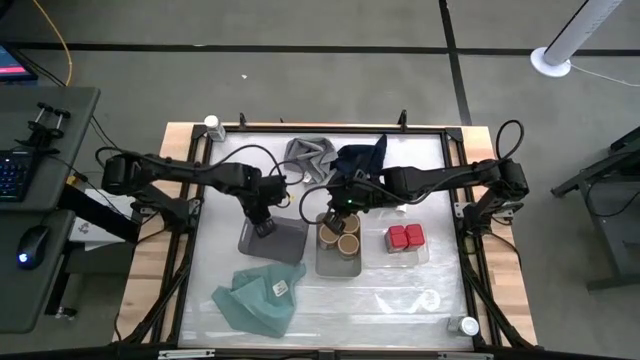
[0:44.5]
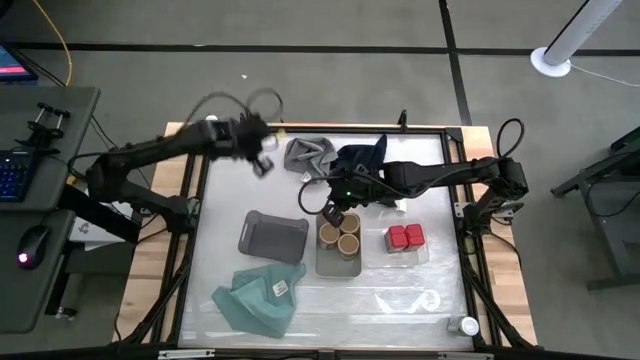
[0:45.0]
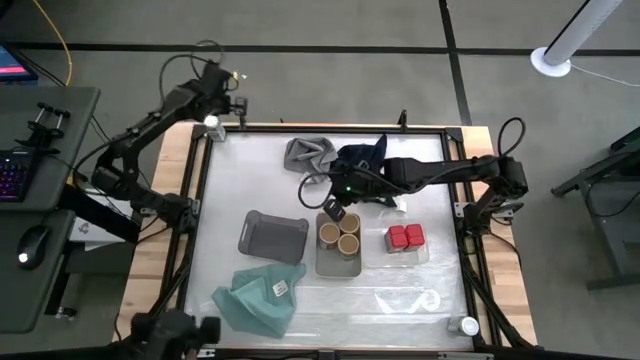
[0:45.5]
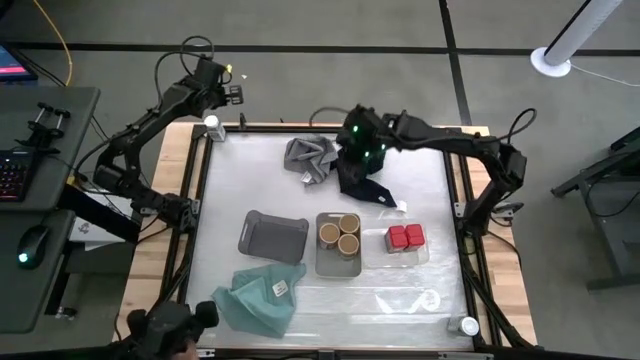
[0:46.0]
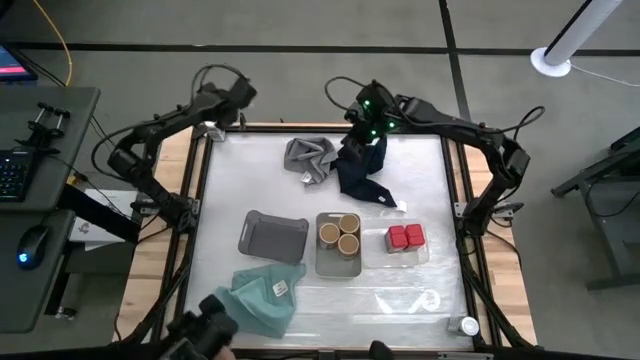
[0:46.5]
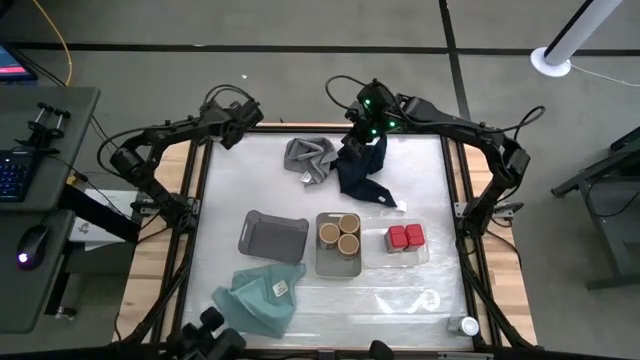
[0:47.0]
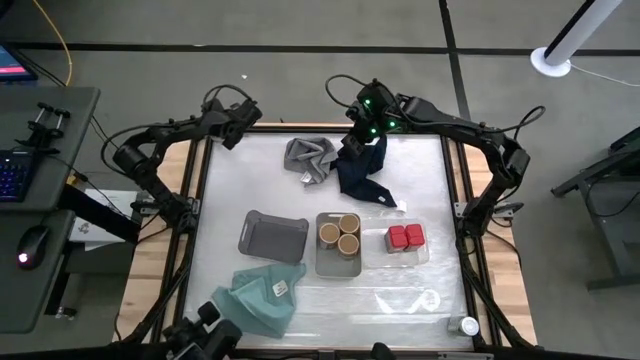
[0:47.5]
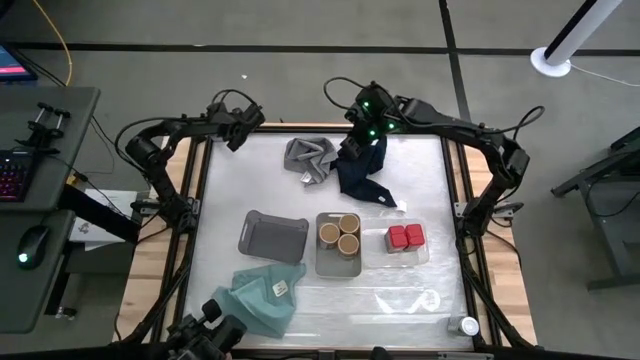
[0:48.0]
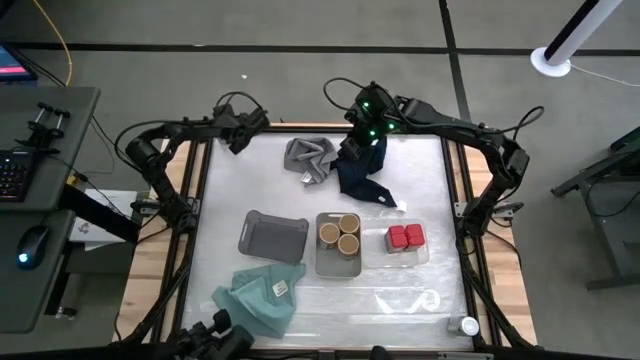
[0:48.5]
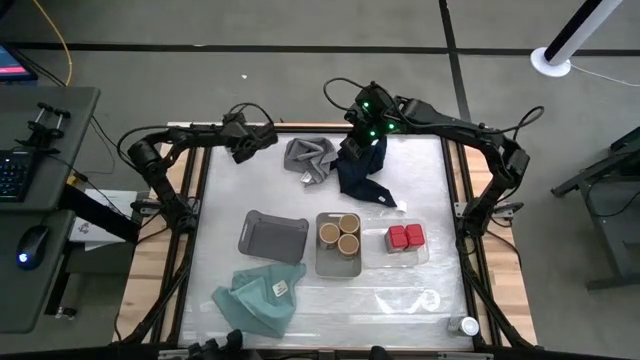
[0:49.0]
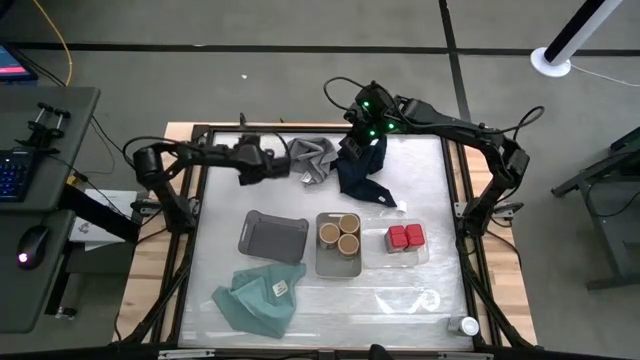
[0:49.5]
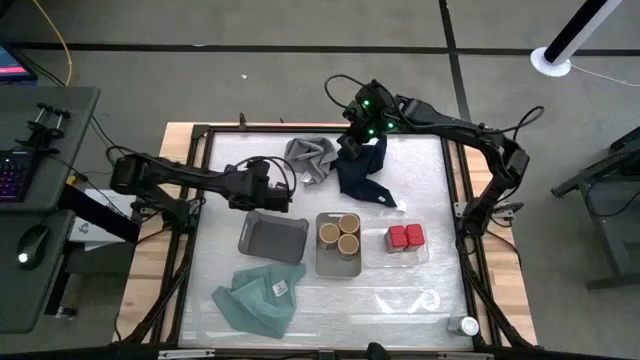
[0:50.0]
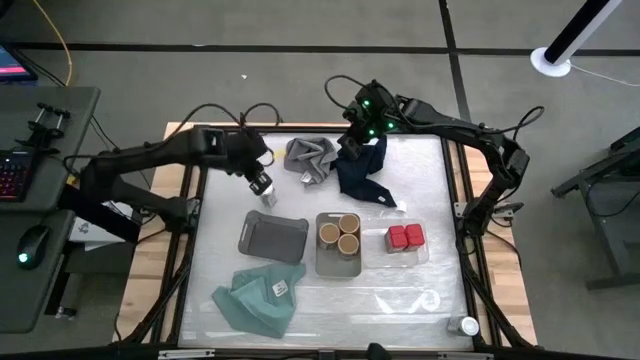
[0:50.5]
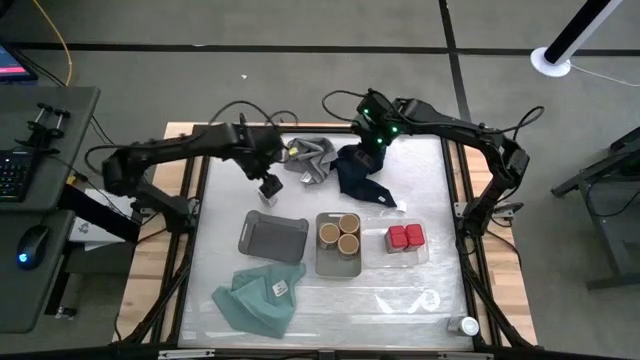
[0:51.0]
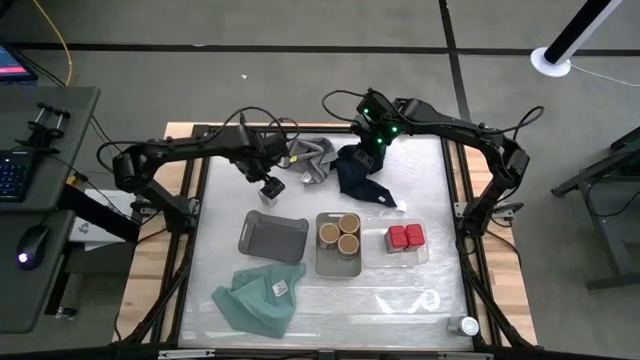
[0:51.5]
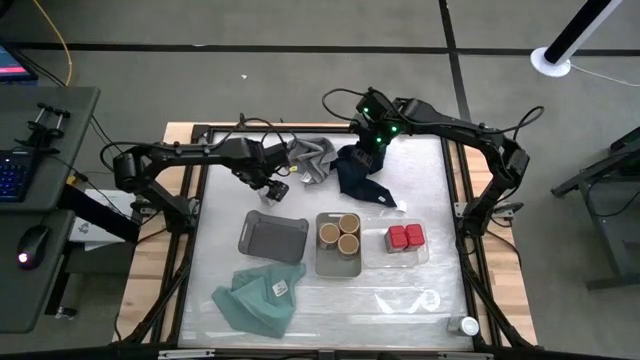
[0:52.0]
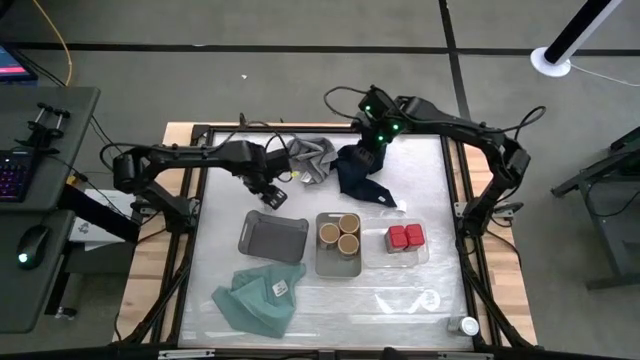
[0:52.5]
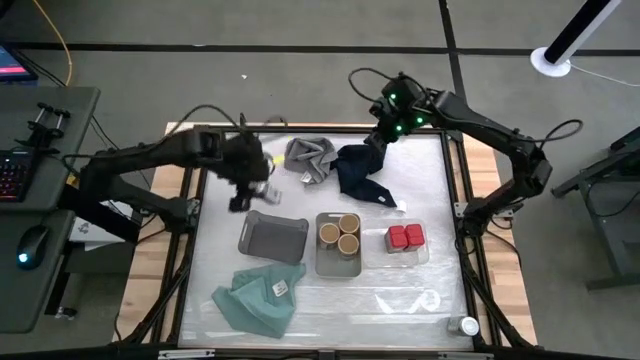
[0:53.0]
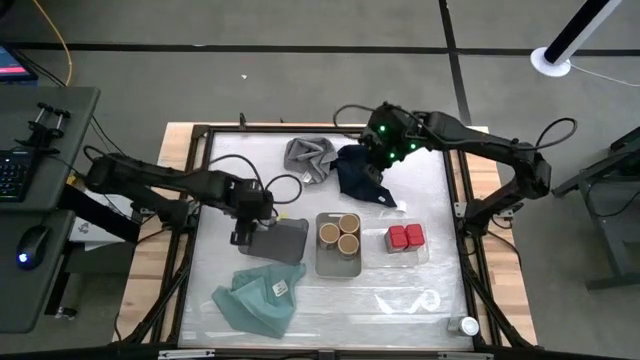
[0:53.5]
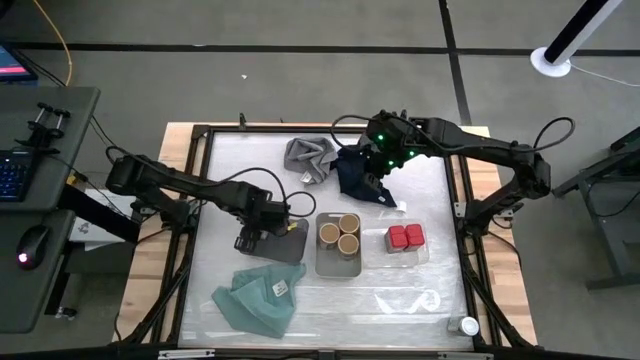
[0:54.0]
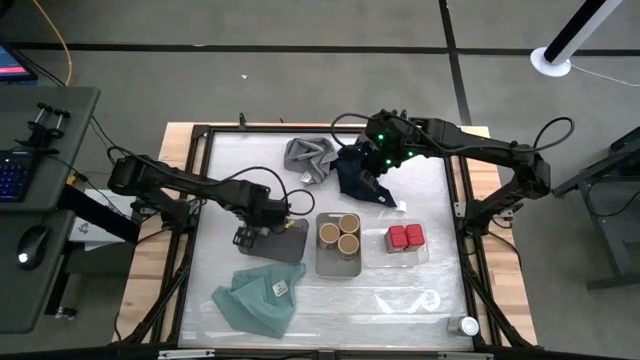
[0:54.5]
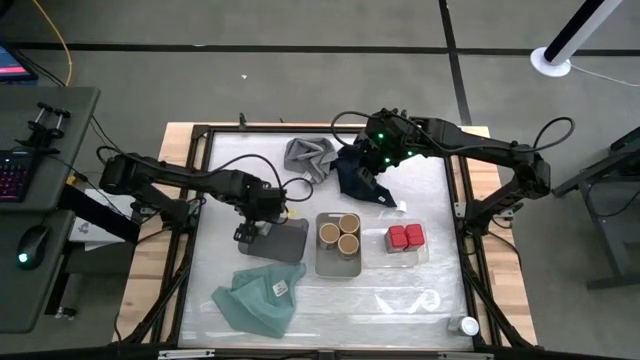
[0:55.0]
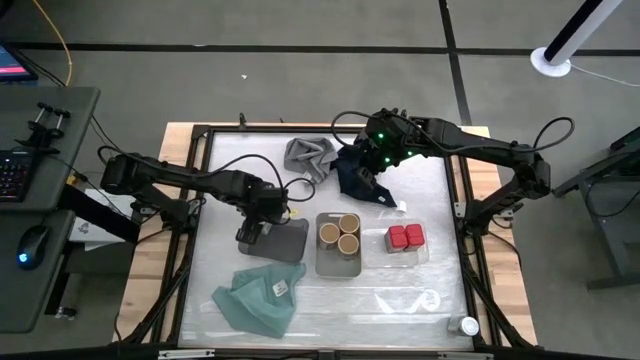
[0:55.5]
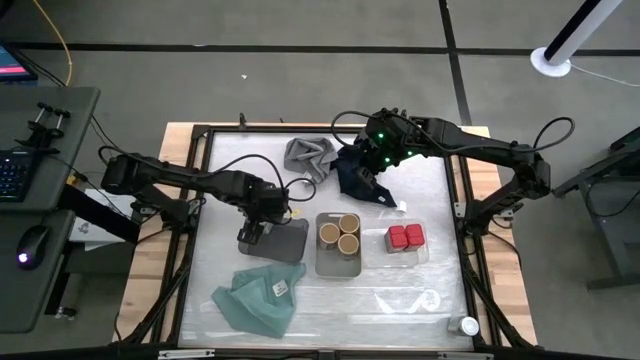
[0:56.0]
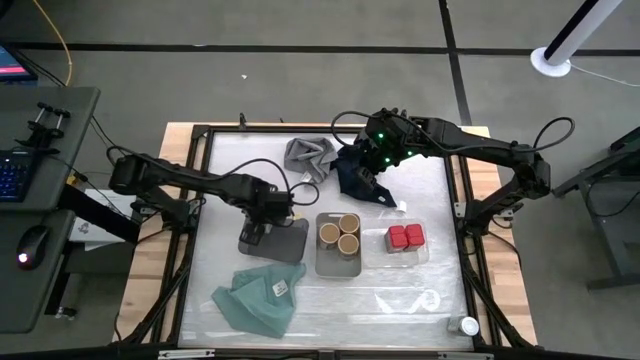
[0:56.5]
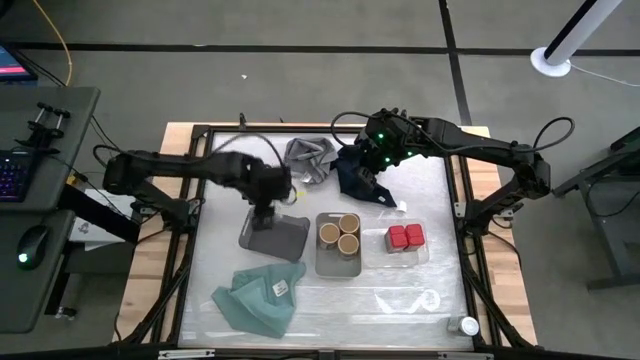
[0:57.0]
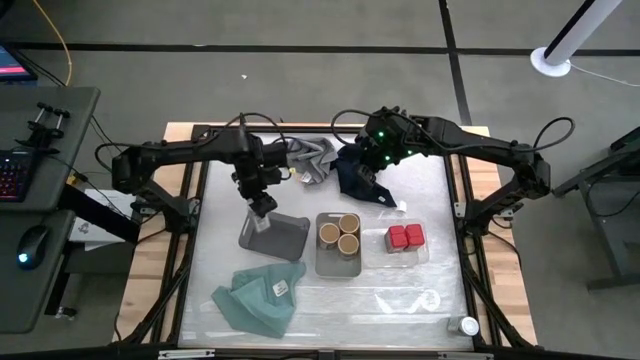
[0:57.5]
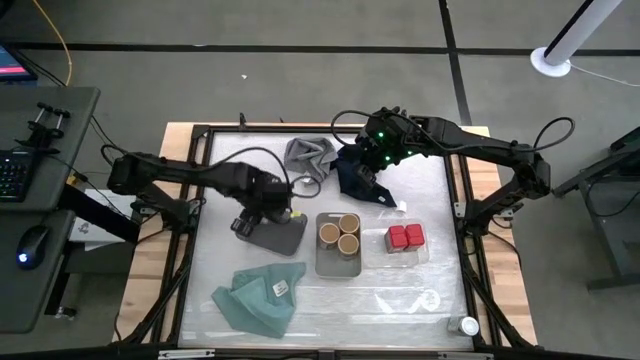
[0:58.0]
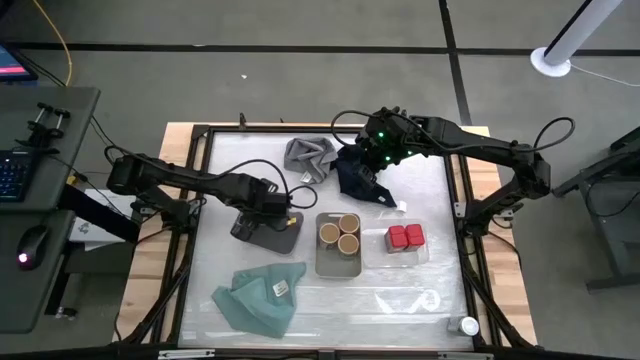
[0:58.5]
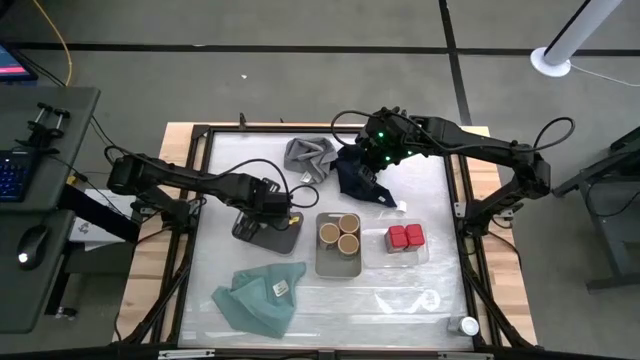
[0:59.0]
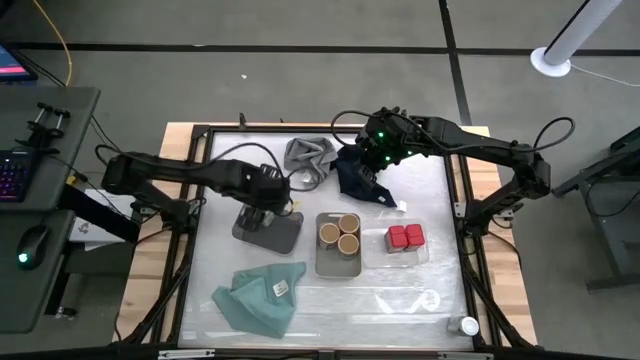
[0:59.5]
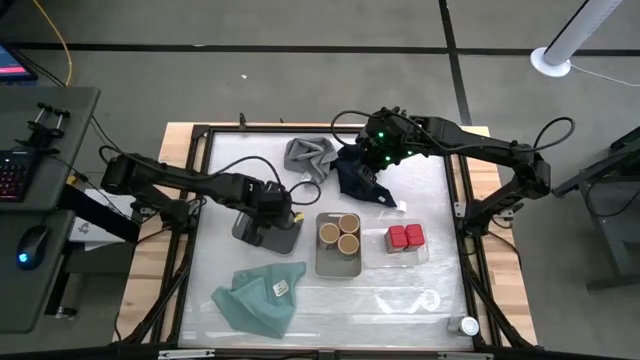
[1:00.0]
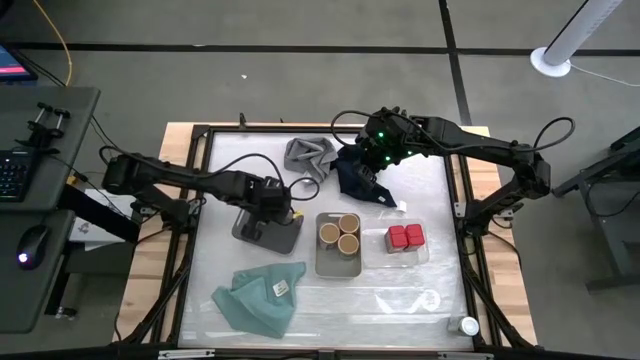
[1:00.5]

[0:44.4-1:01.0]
Task: Sort spices by type
Put the top white spice bottle into the black bin

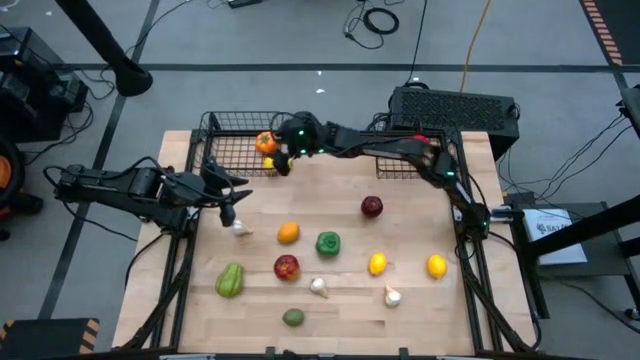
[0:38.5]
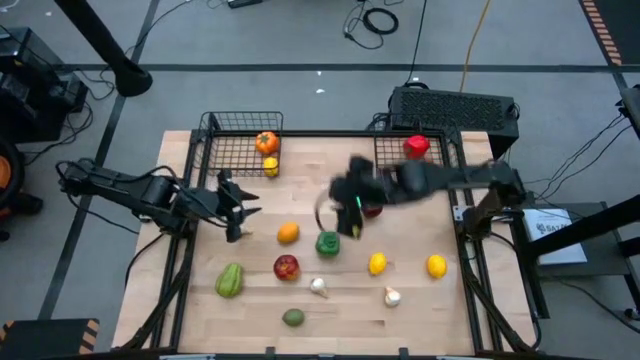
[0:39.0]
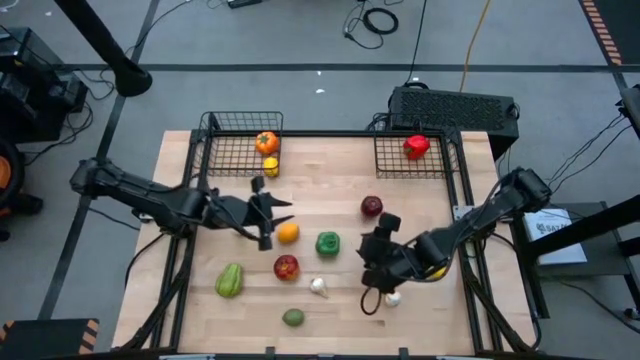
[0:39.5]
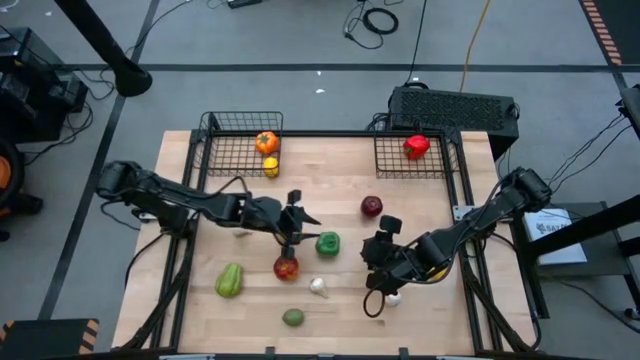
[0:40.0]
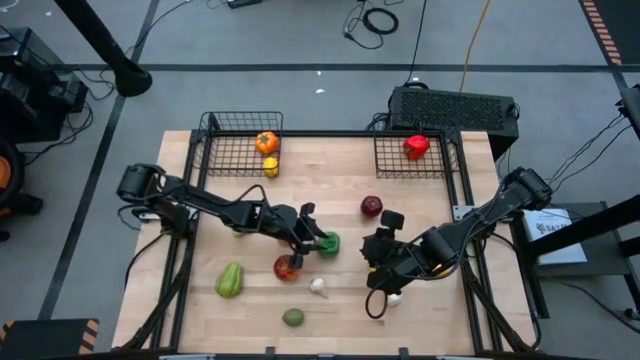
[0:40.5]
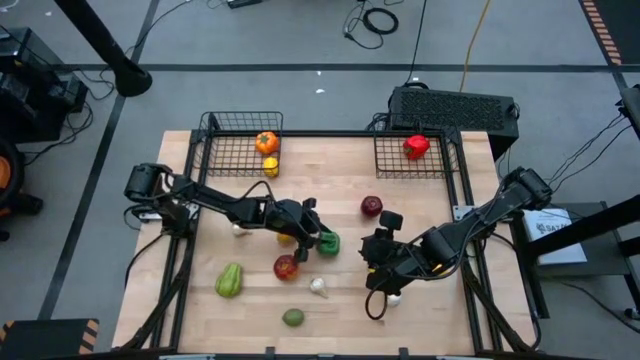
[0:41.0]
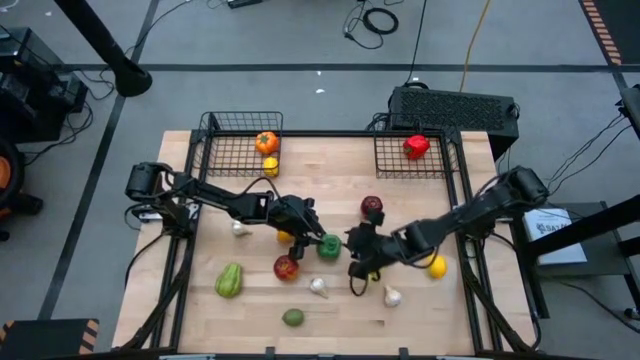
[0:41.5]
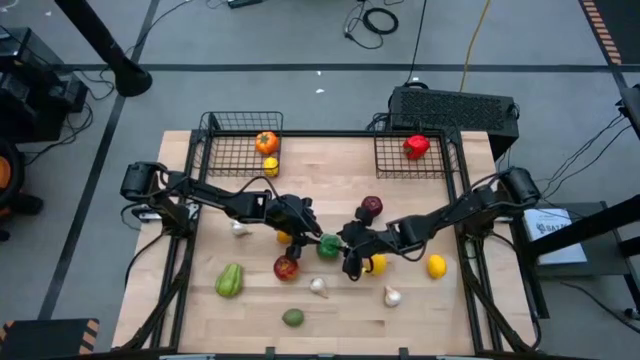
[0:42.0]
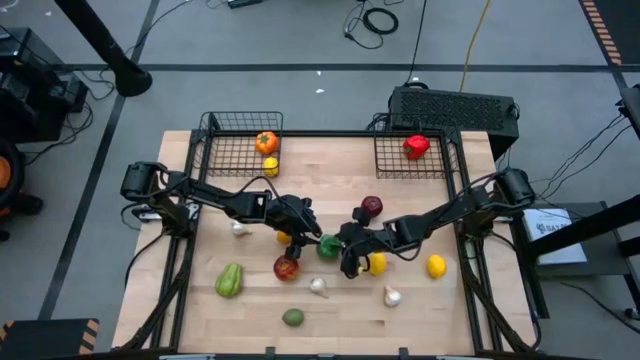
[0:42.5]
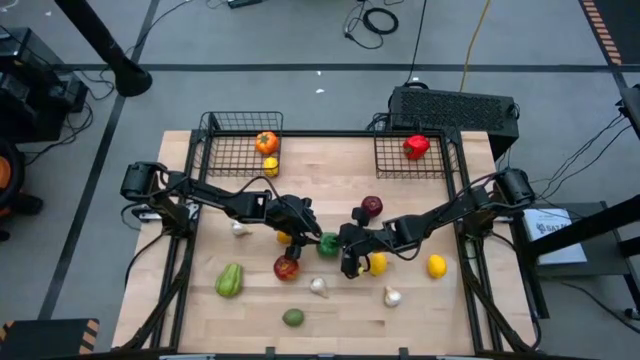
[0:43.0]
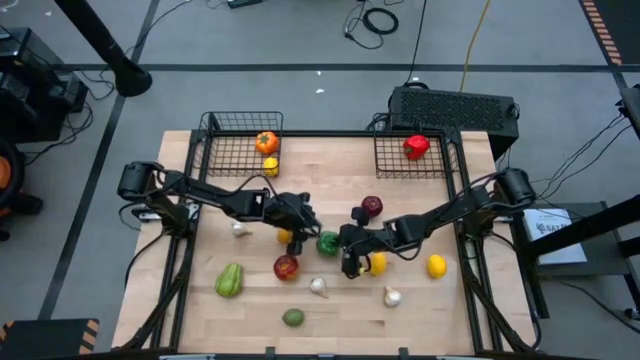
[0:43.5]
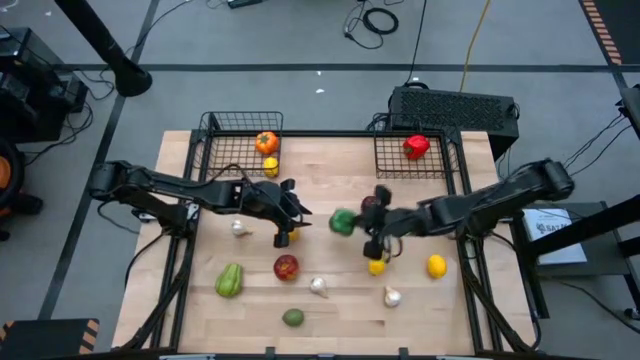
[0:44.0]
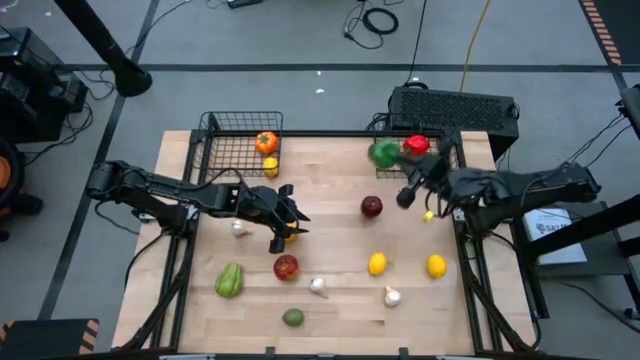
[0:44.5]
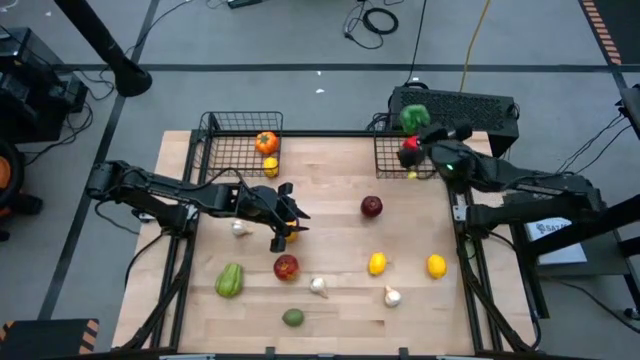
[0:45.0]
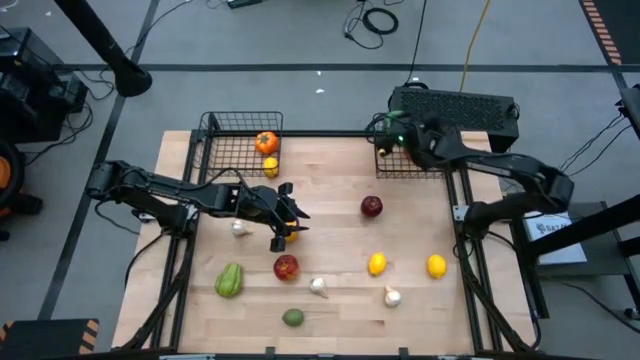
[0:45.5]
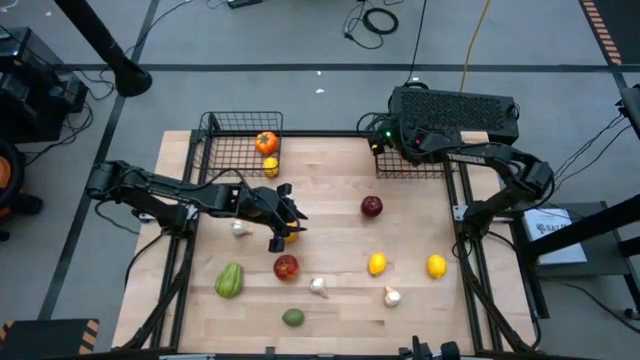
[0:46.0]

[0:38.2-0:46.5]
Task: Sort produce into baskets
Put the green bell pepper in the right basket
